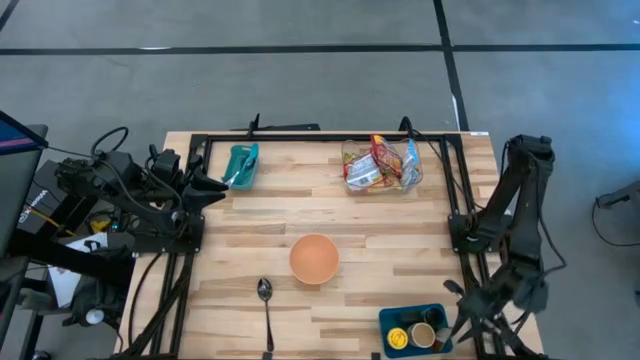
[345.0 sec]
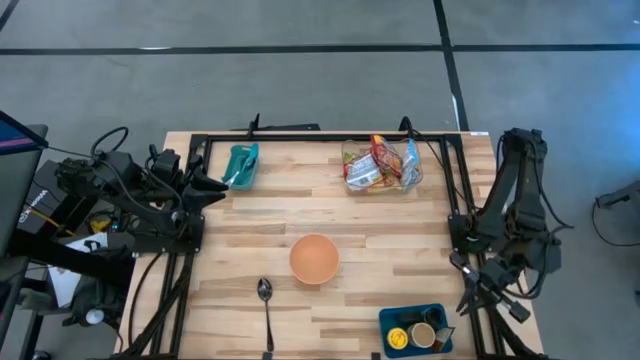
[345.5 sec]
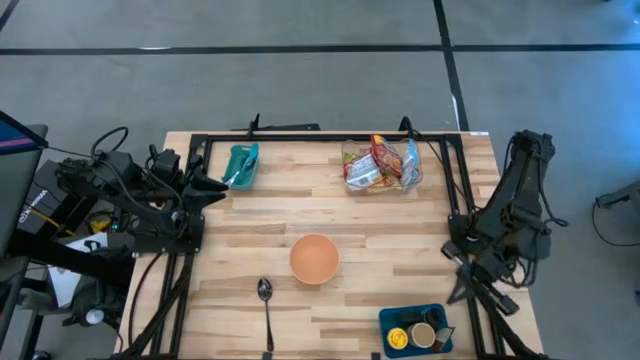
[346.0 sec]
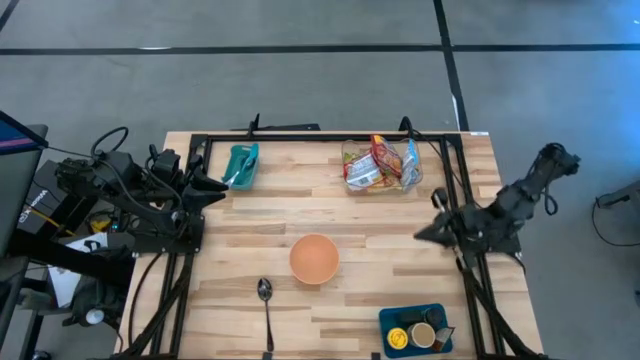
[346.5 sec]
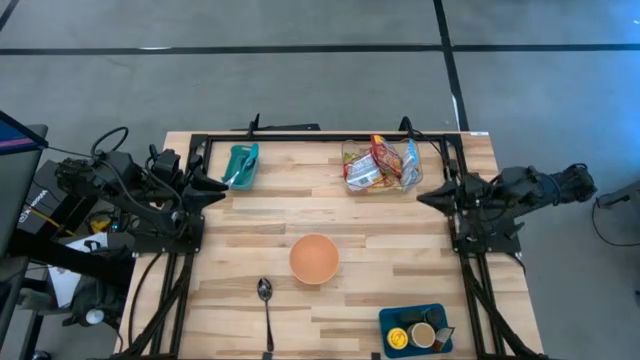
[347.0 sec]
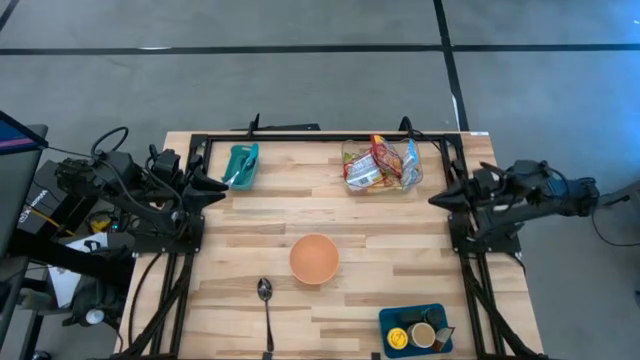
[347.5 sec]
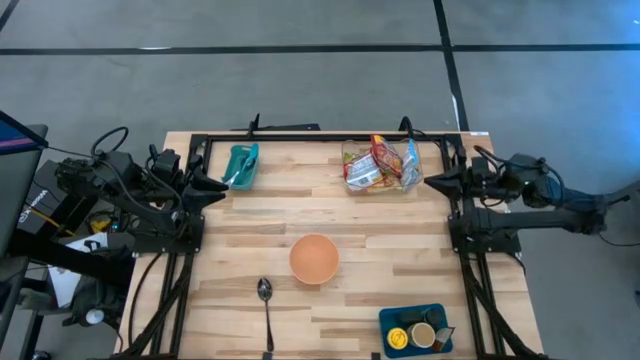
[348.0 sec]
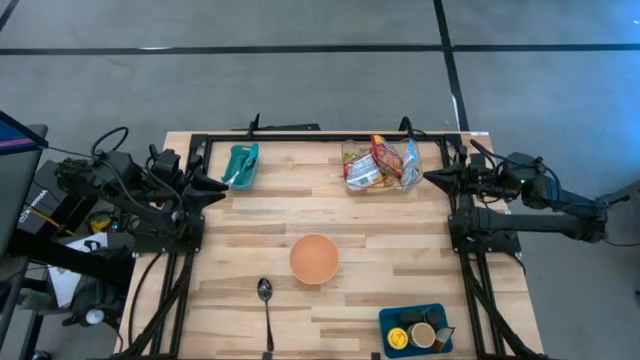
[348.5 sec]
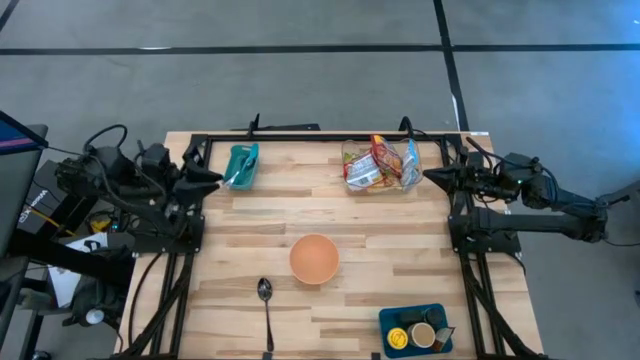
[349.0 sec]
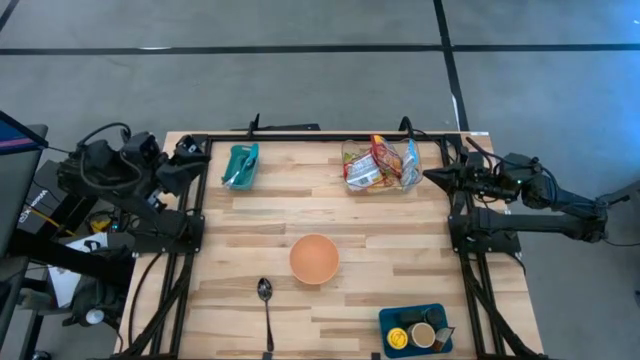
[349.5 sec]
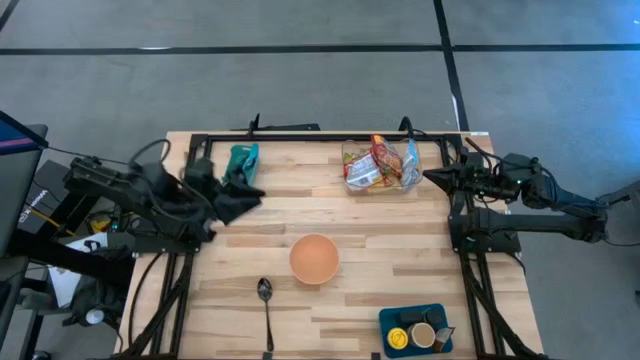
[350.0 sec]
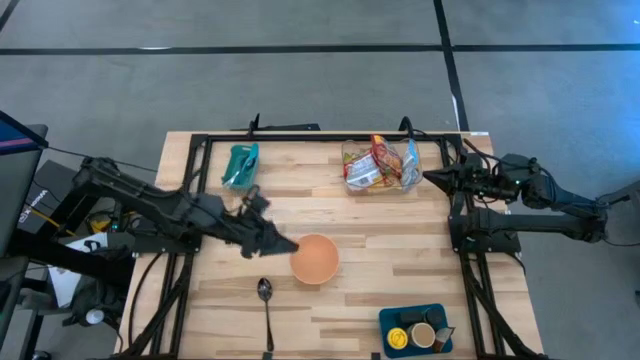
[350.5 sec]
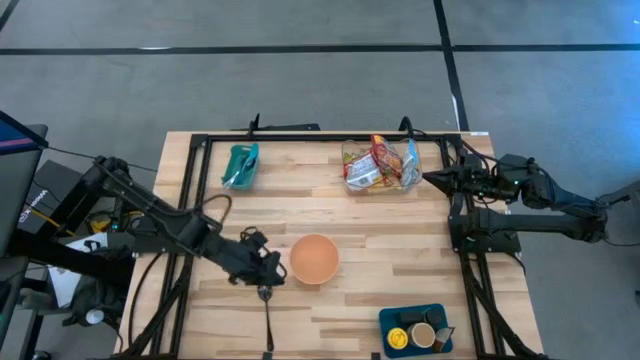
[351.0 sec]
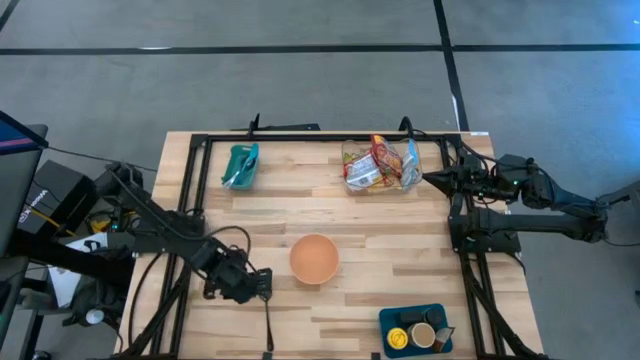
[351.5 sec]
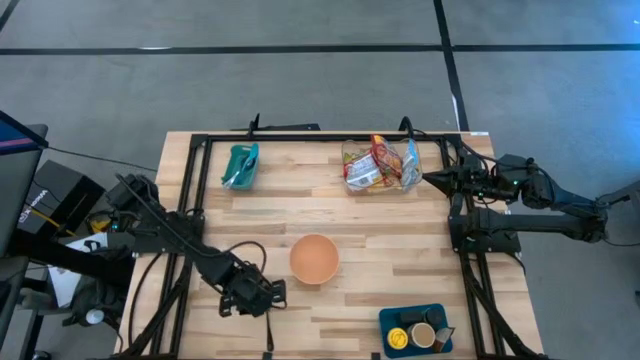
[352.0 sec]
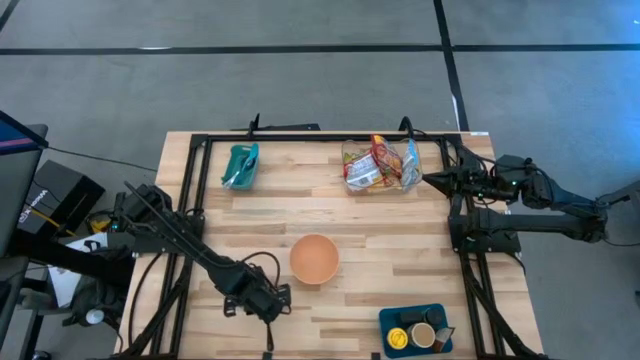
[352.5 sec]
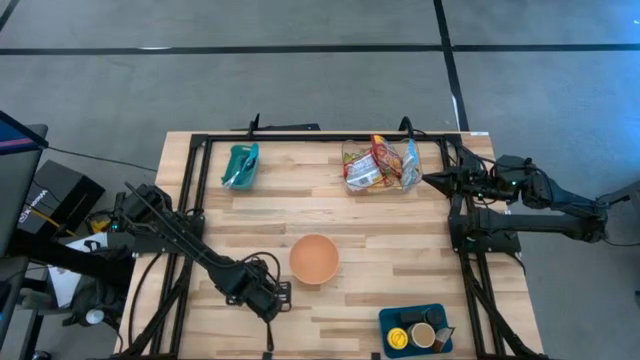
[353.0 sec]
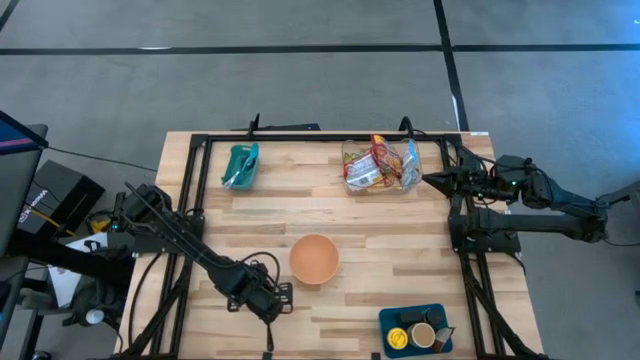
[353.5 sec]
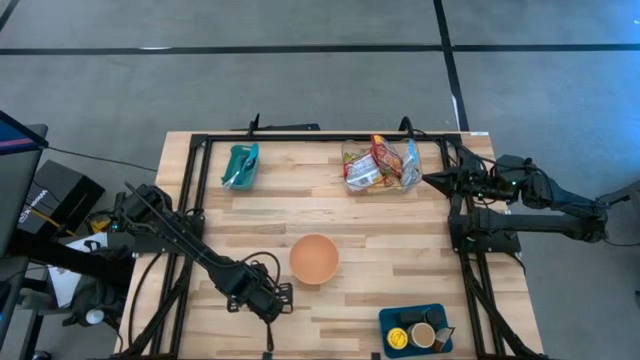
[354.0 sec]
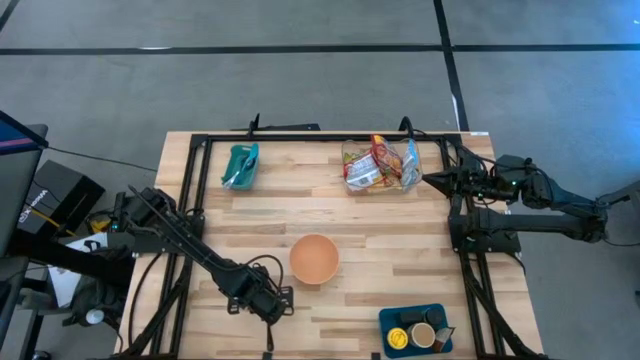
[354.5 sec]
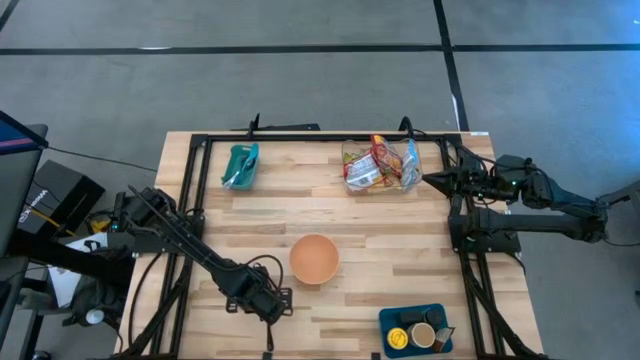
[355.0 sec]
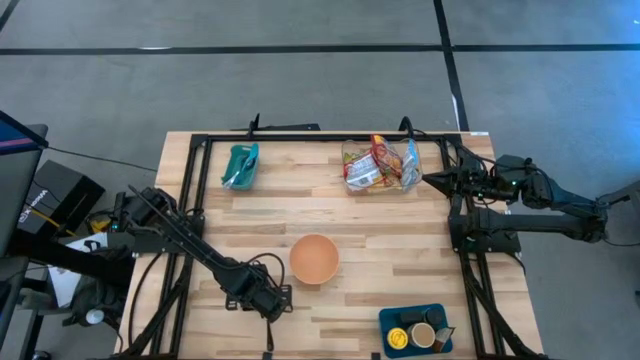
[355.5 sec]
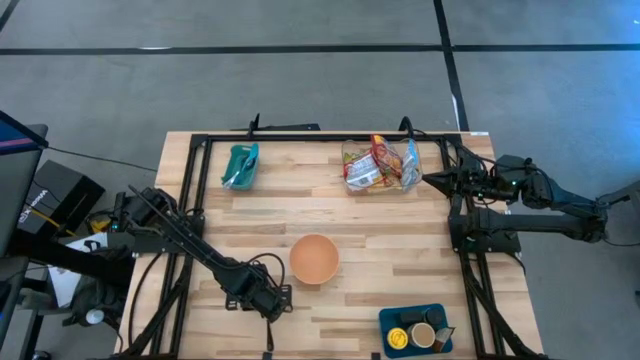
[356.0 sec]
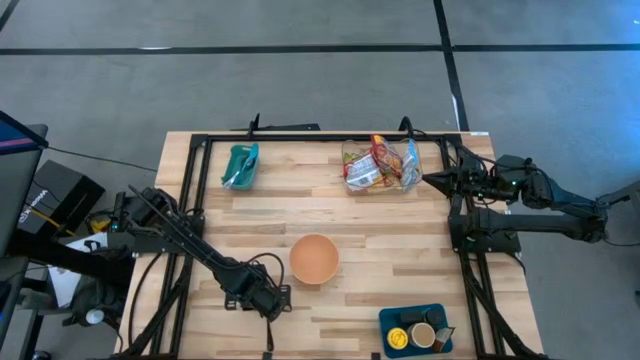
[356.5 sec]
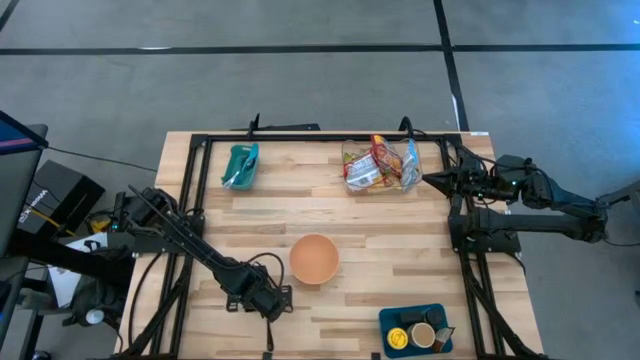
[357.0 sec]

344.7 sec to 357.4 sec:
Task: Pick & Place Food Item
Put the black spoon into the light green bin

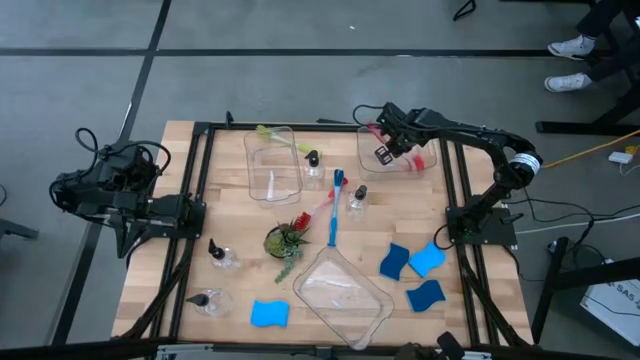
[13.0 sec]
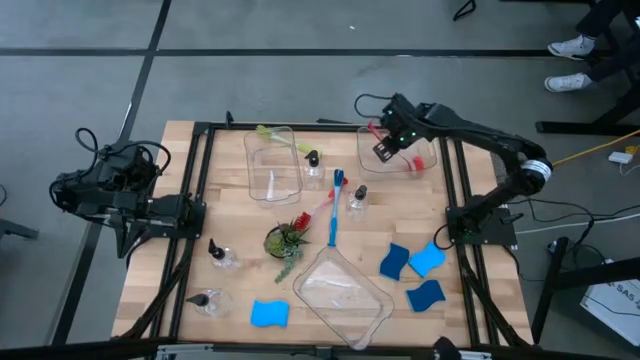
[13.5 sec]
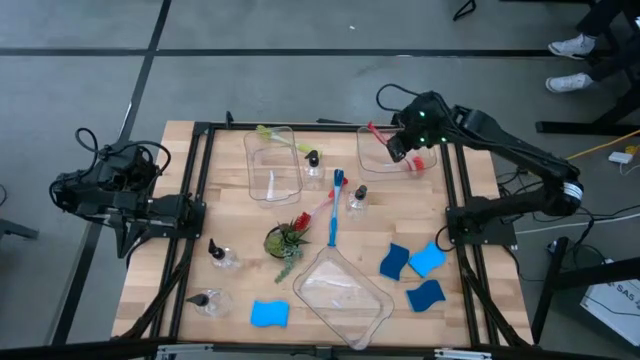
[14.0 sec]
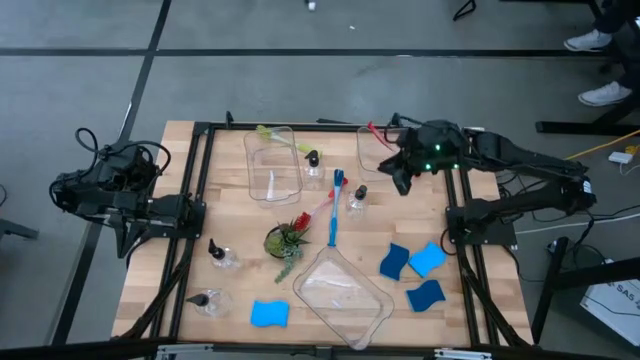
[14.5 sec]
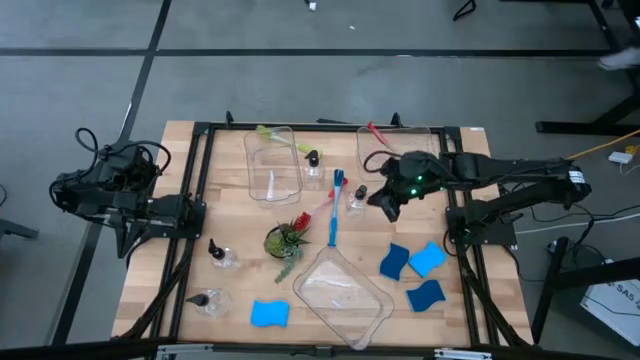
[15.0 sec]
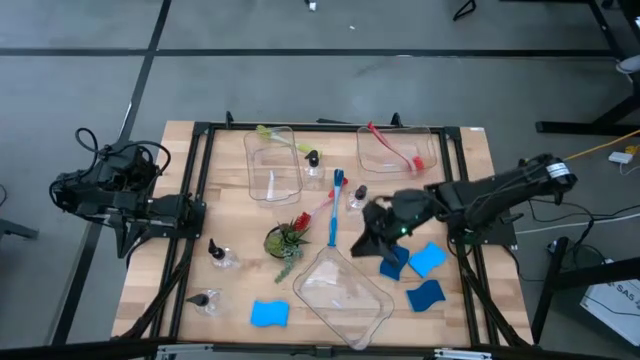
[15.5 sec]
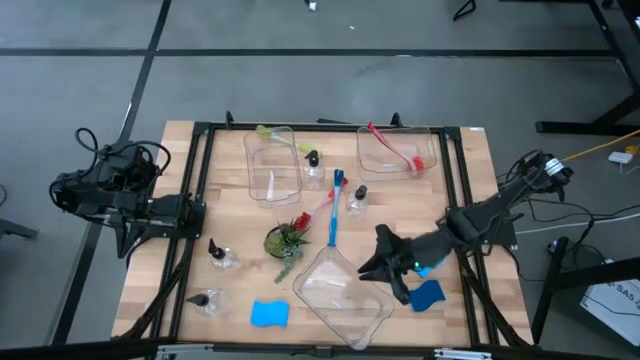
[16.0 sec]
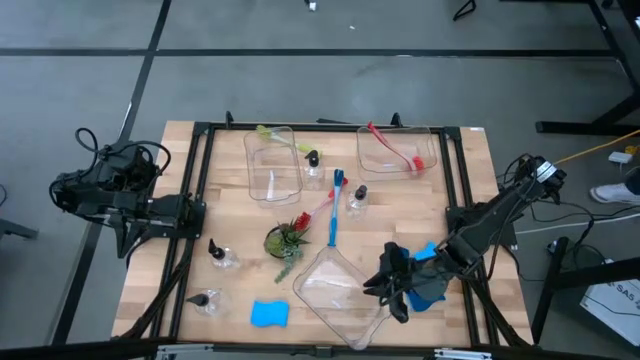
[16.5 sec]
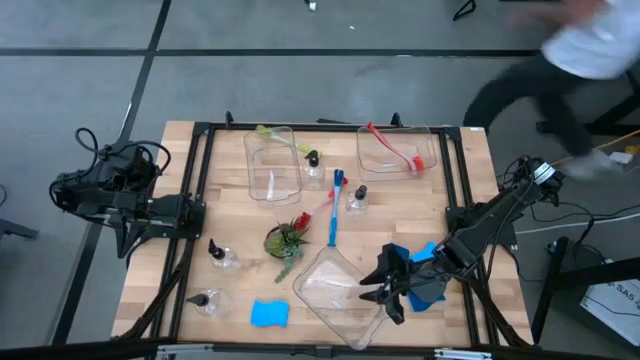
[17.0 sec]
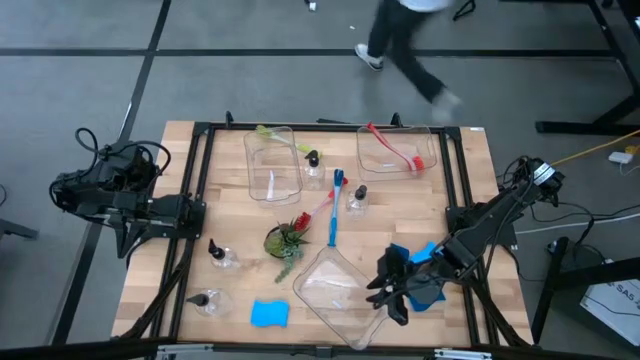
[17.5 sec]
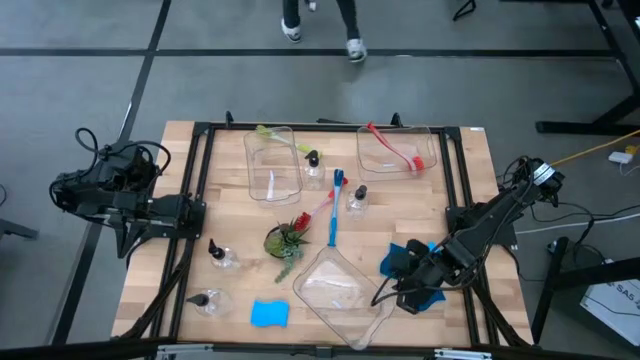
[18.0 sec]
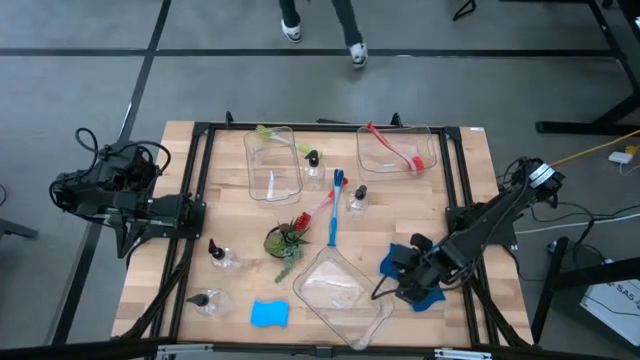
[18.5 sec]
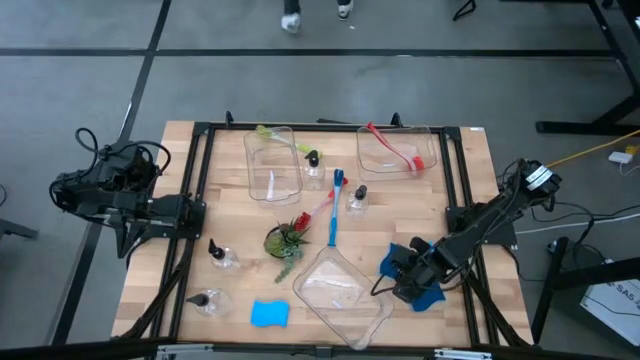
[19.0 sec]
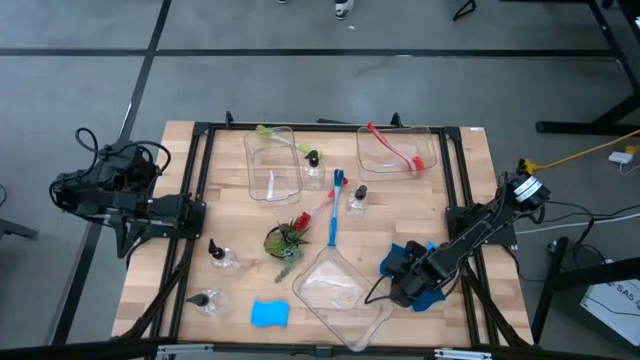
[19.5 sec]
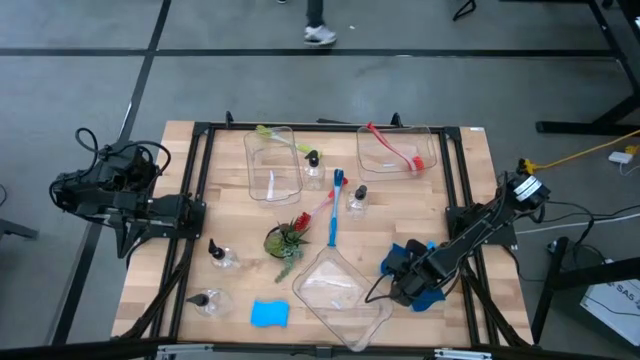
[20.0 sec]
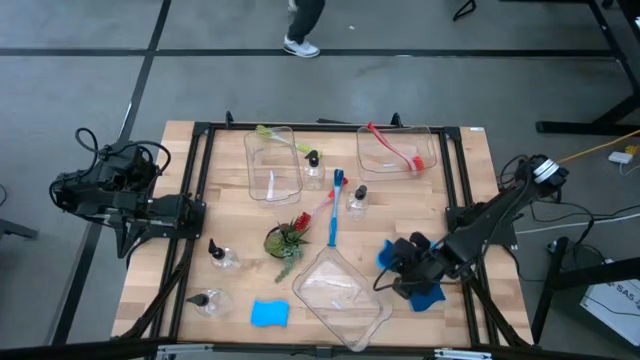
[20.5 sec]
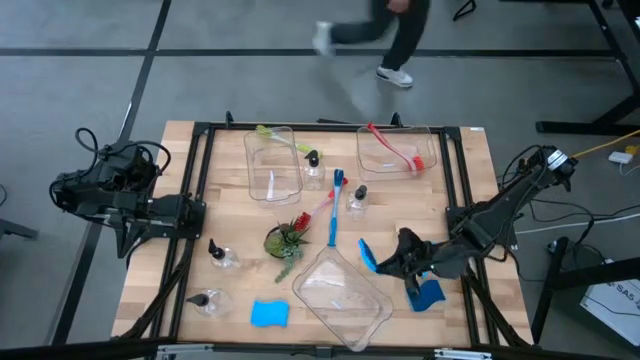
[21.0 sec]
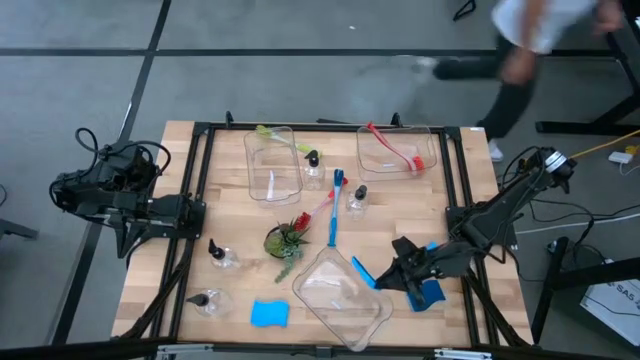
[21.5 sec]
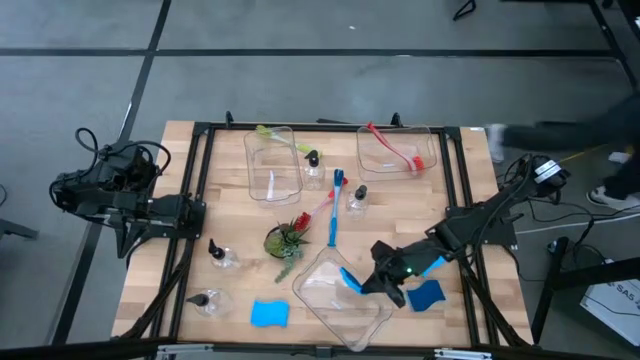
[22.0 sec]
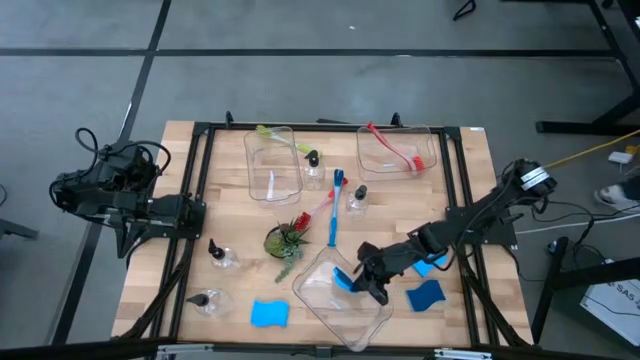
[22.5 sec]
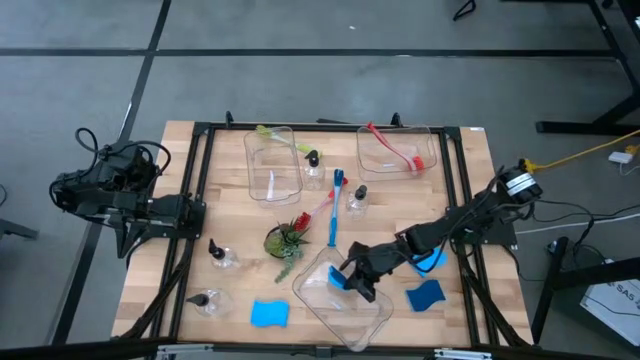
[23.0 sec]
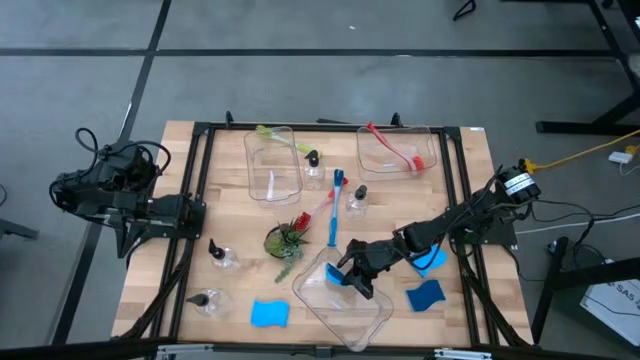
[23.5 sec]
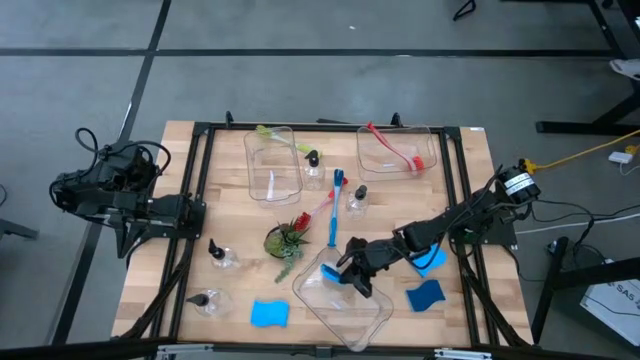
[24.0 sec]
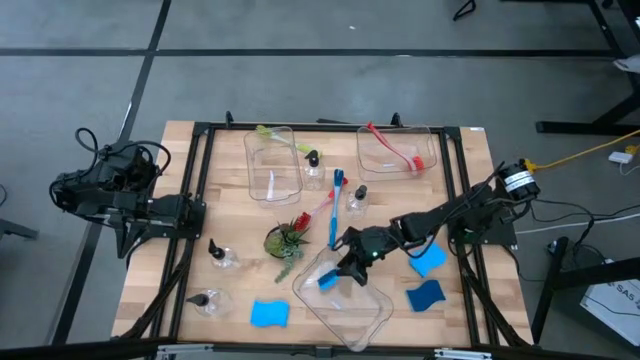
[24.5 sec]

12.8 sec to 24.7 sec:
Task: Pick & Place Kitchen Sink Supplies
Put the blue sponge into the bottom transparent bin
